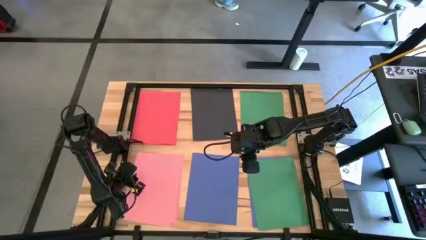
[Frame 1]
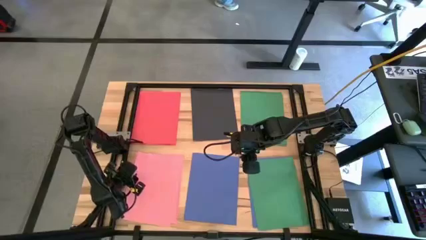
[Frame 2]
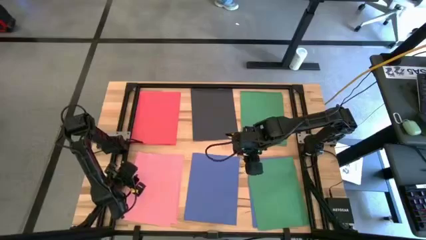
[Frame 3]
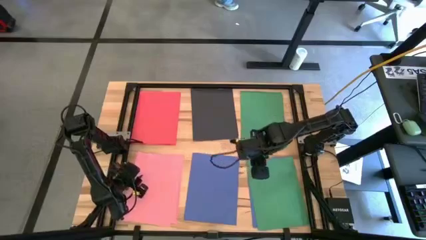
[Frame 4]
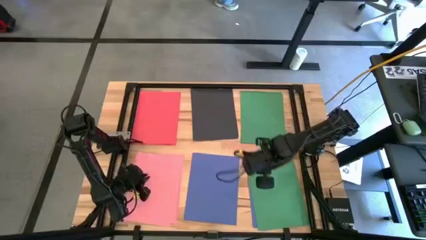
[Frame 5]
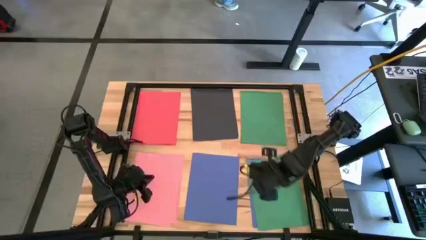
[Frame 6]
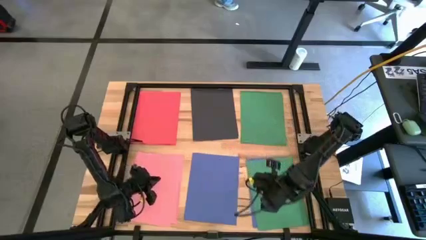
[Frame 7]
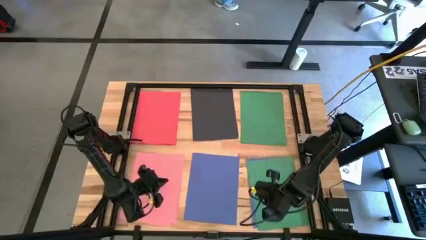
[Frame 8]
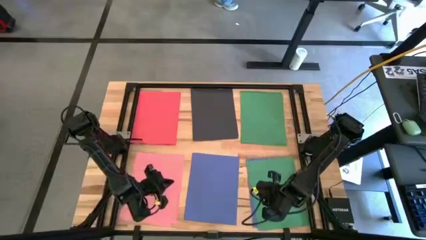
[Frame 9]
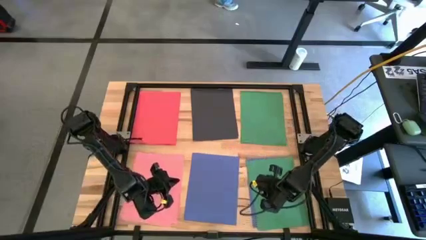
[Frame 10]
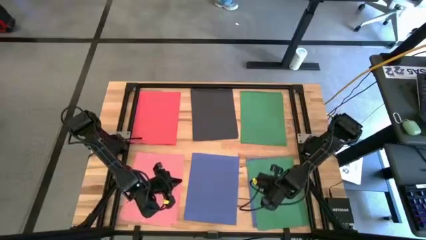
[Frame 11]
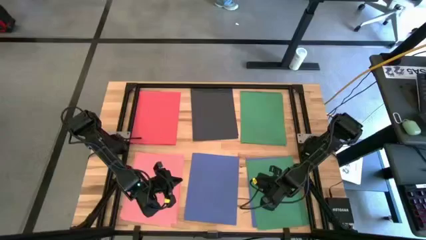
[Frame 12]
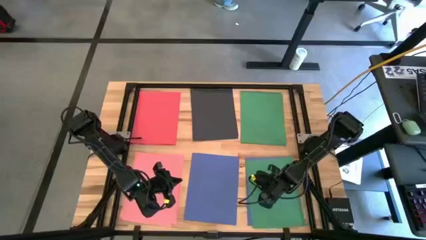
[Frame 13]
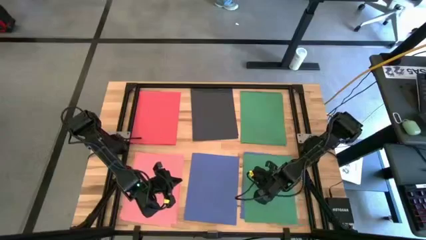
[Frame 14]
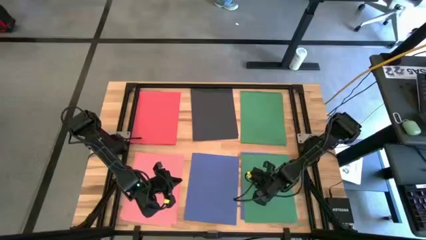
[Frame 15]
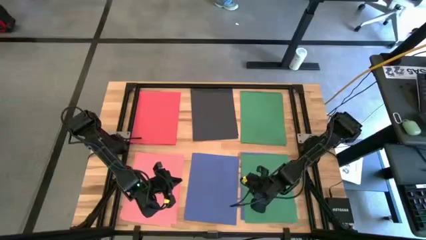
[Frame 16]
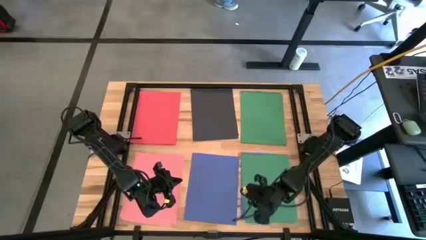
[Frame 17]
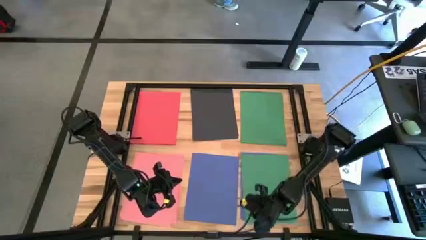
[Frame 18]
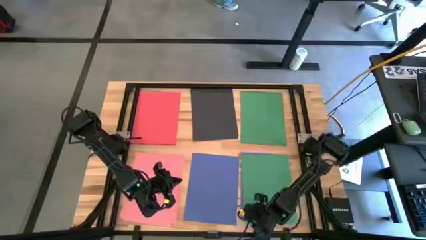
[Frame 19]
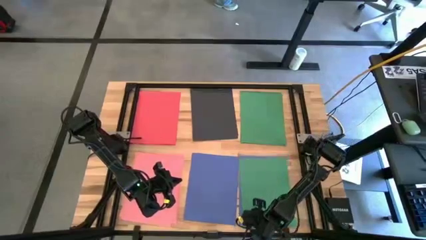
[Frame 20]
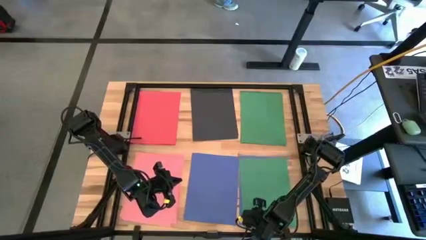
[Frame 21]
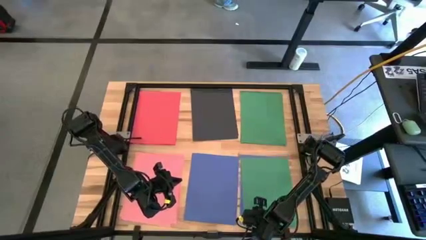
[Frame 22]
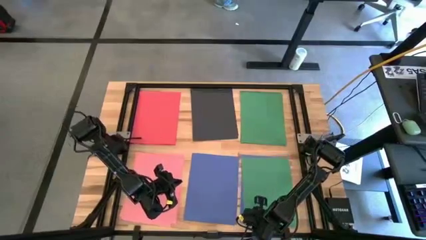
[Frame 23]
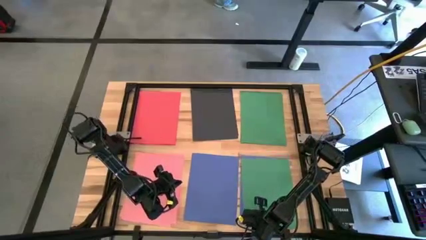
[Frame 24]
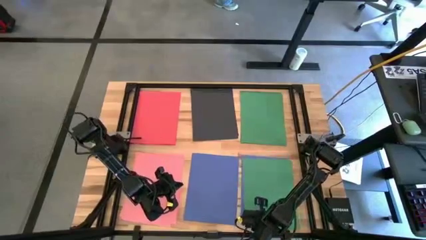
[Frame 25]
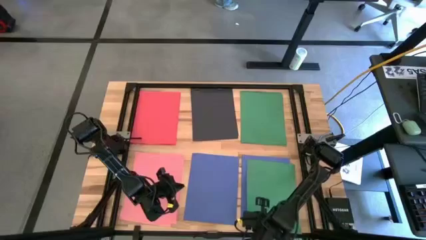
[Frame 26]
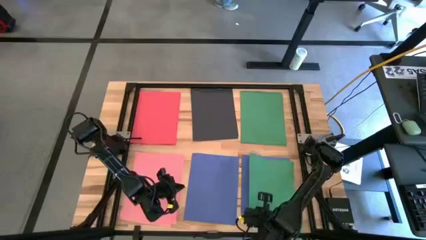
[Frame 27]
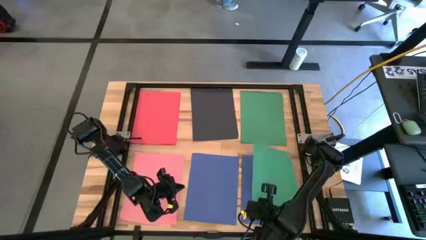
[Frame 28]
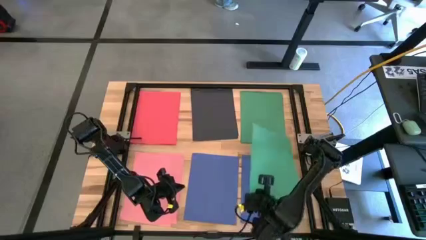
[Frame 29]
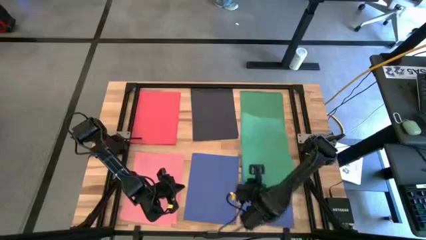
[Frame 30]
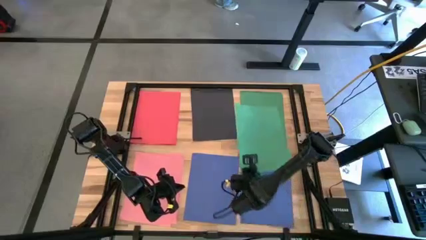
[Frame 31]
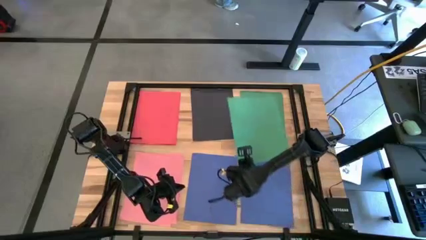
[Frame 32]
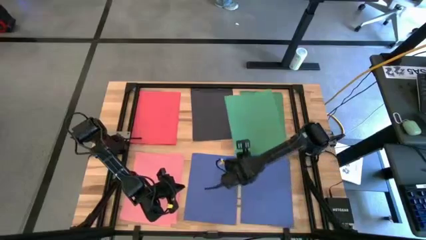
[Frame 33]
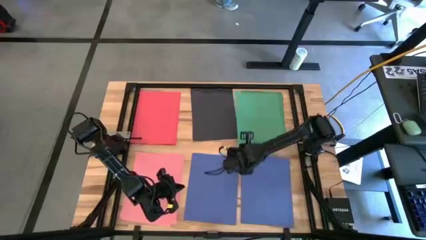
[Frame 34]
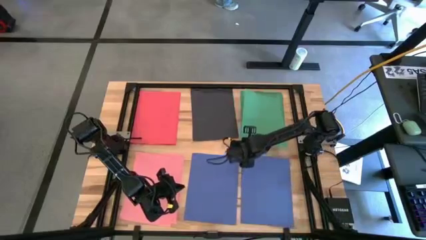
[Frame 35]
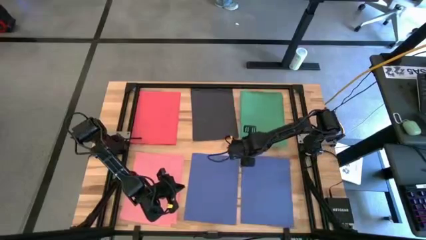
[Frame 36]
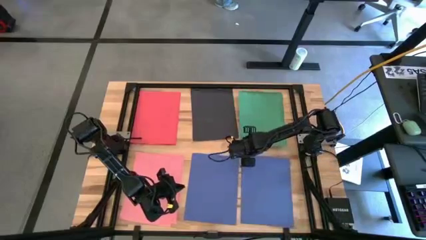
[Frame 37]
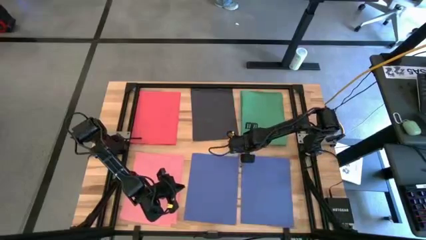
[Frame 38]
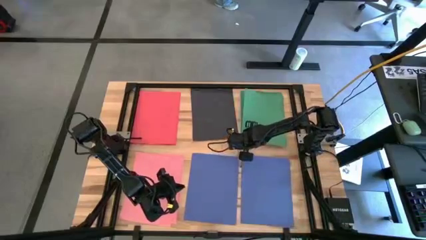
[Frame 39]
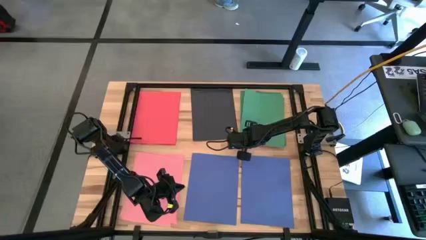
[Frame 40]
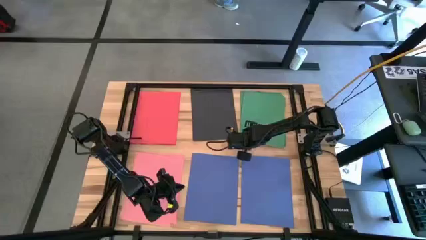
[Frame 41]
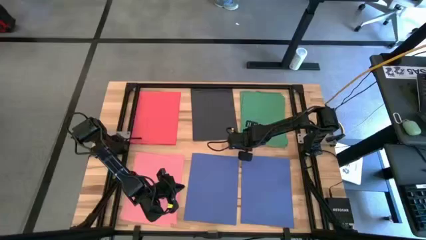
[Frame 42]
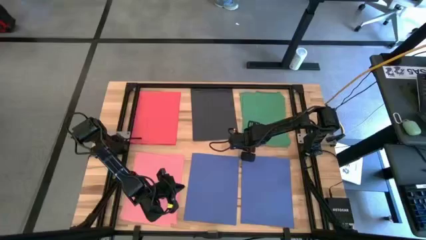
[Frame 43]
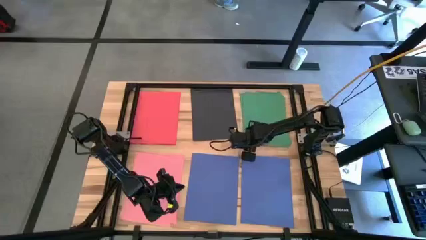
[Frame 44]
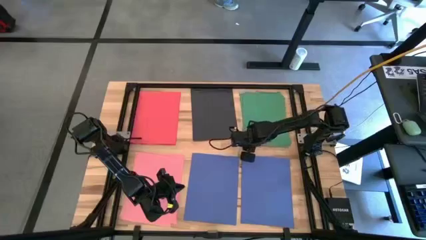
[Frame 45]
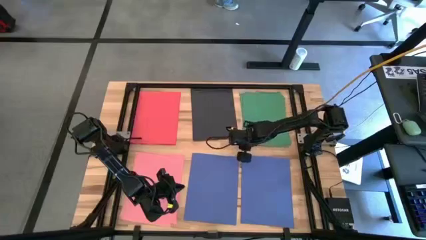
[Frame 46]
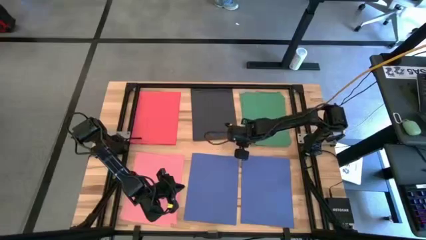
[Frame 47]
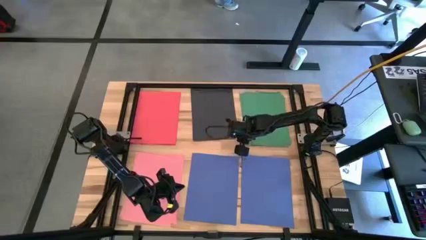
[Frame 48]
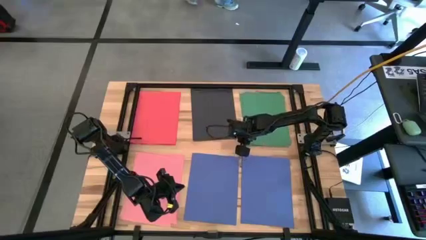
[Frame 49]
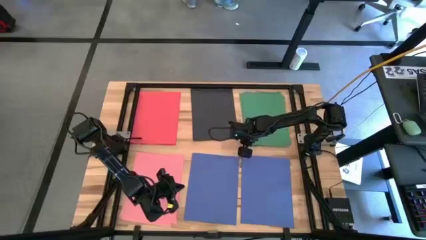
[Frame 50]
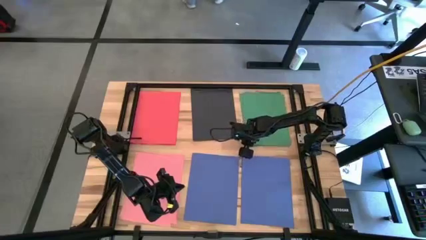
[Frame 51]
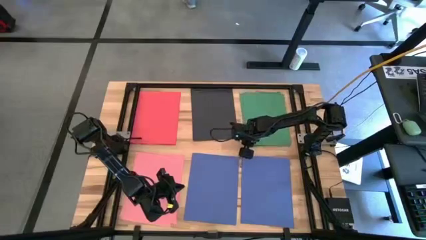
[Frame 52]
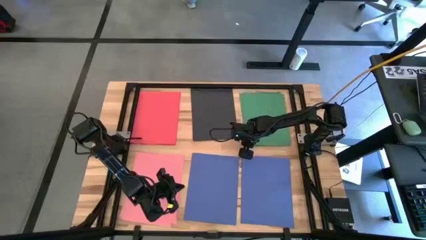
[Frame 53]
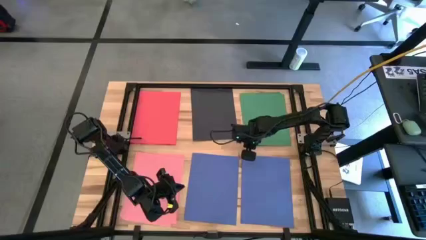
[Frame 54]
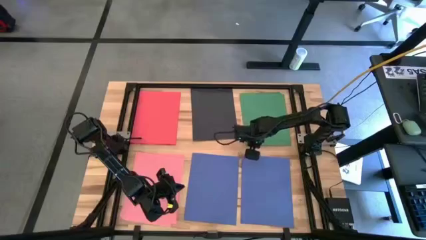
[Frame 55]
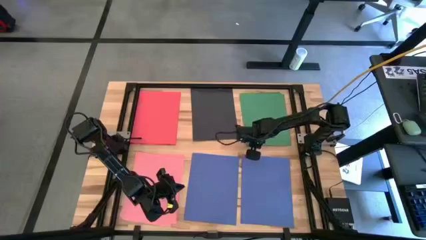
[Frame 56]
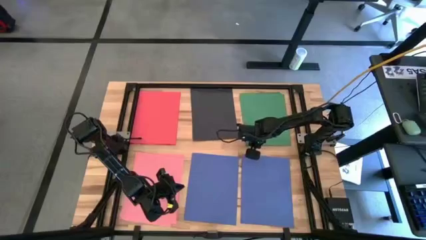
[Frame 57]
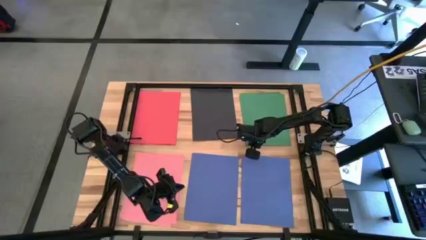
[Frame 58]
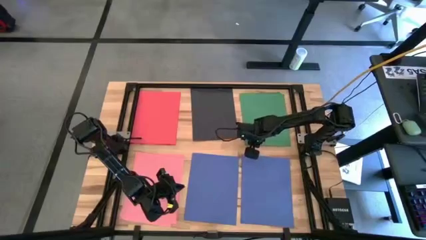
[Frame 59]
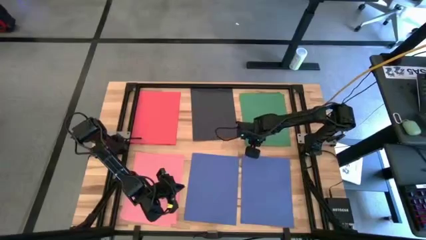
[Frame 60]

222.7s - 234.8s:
Task: Organize paper
Stack the green paper on the stacked green paper

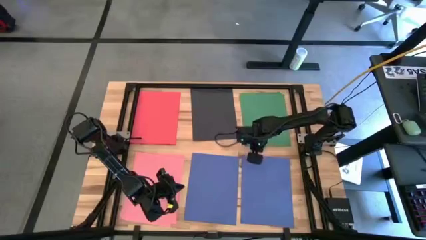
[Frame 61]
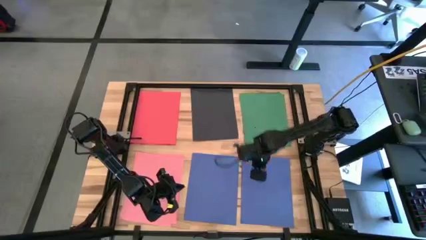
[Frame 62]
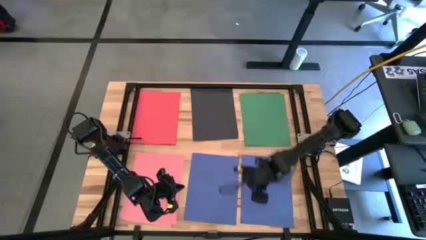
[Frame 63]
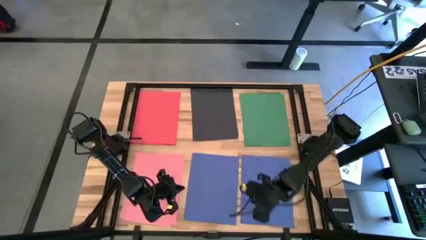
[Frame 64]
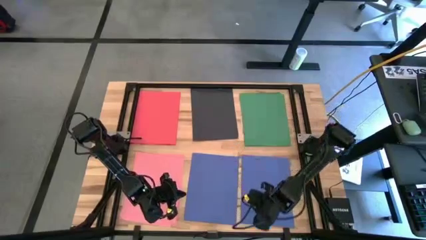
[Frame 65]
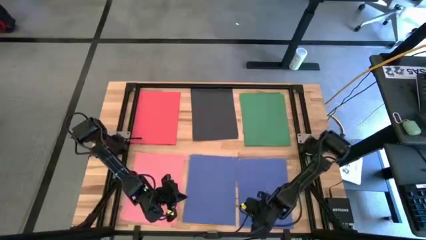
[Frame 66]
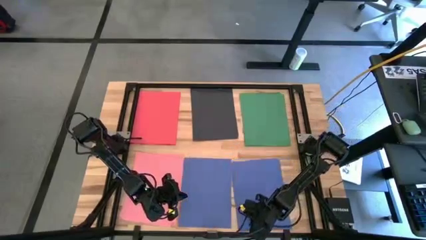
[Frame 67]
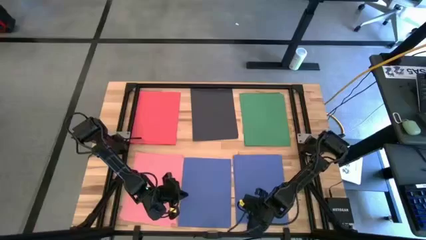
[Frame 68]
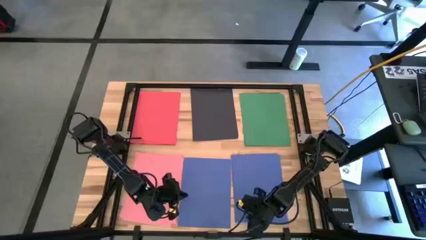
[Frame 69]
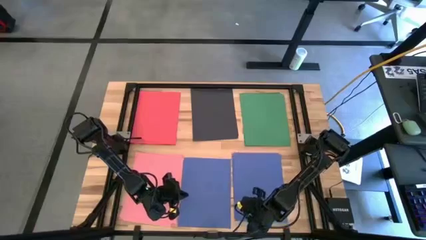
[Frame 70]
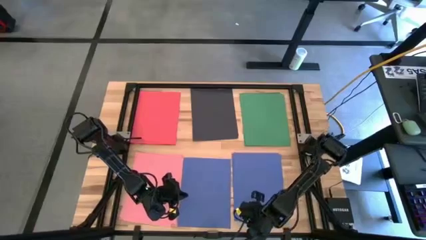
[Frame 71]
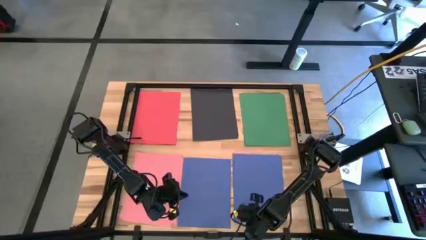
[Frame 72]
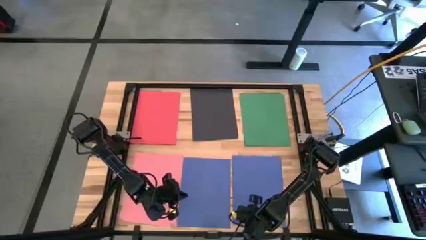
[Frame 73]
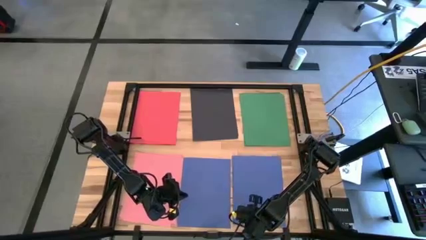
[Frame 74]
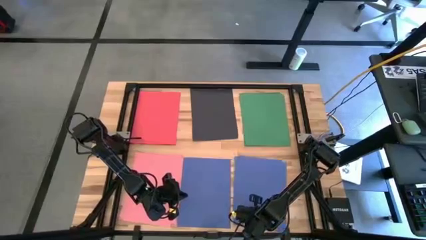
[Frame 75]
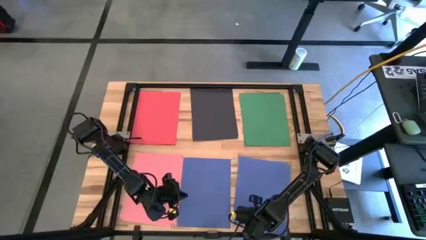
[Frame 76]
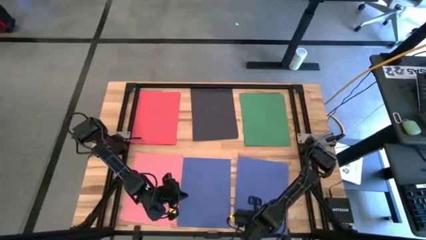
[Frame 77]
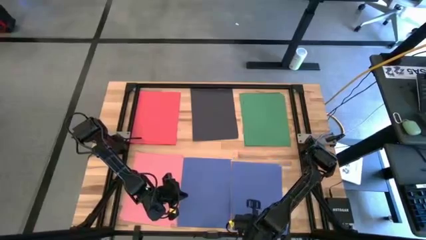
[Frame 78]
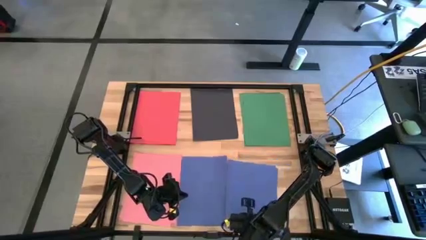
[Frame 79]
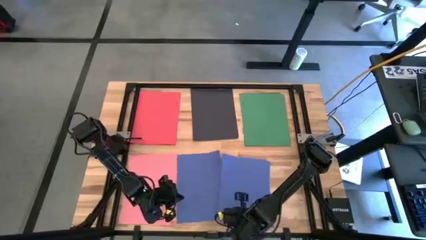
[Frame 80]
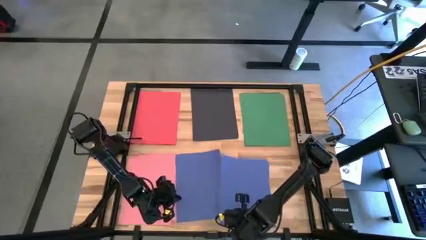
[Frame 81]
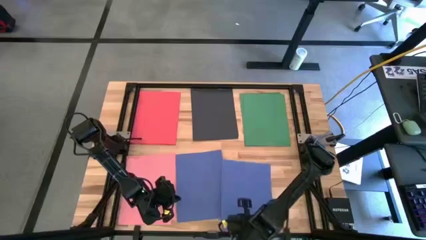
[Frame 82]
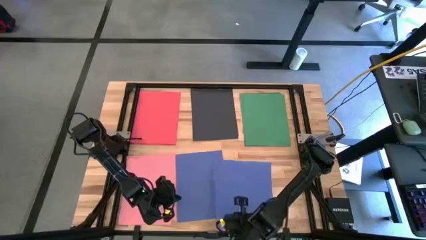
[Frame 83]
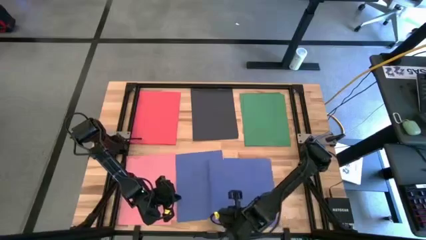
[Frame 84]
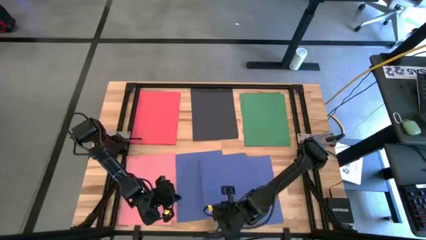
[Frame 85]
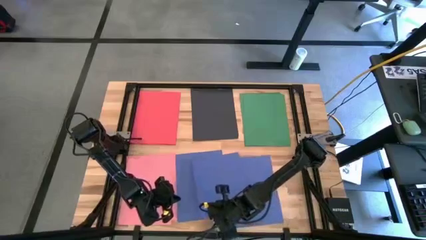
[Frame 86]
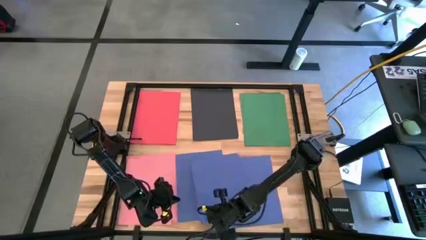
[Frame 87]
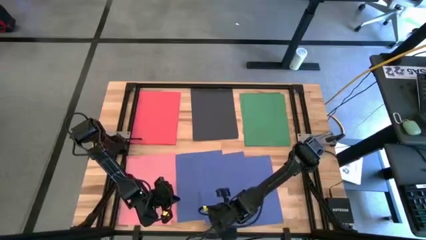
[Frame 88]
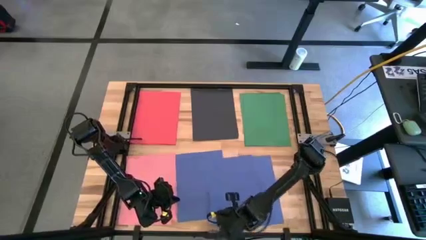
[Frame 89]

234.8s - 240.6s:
Stack the left blue paper on the stacked blue paper
